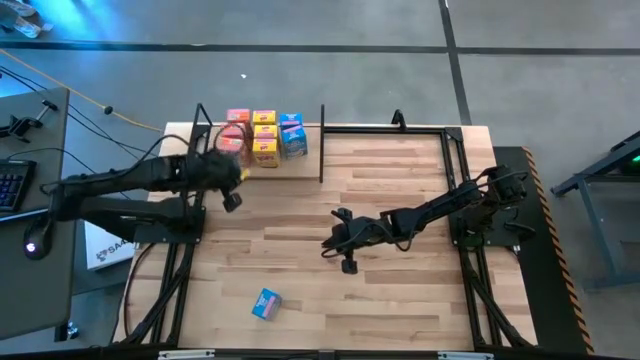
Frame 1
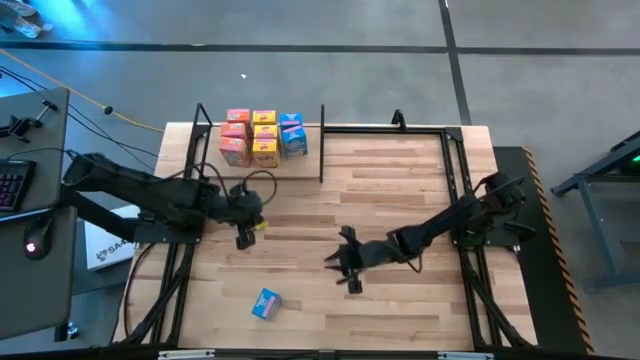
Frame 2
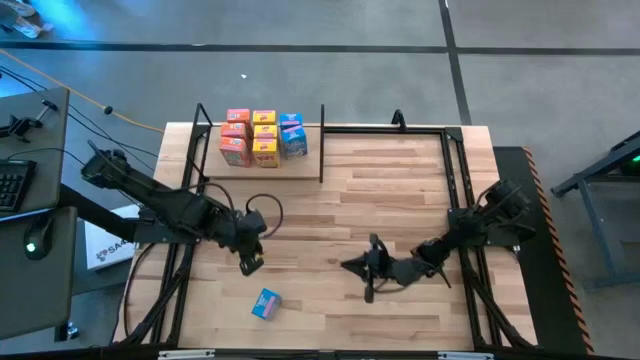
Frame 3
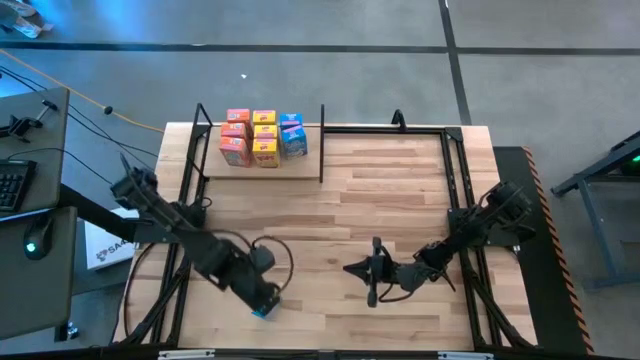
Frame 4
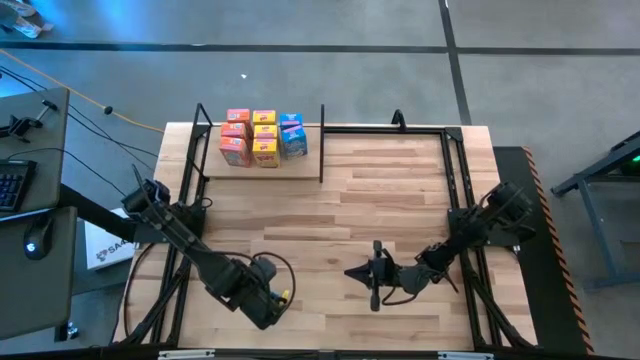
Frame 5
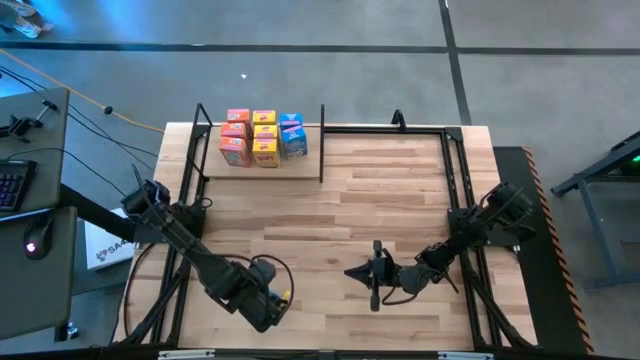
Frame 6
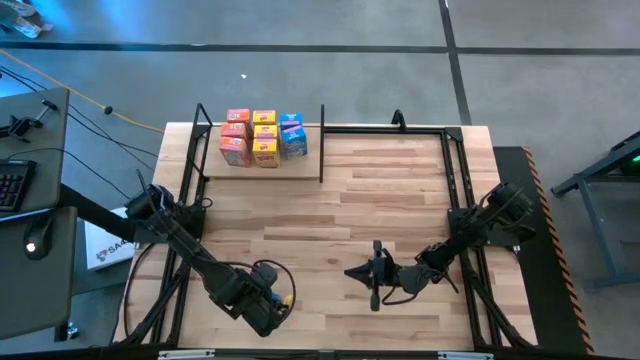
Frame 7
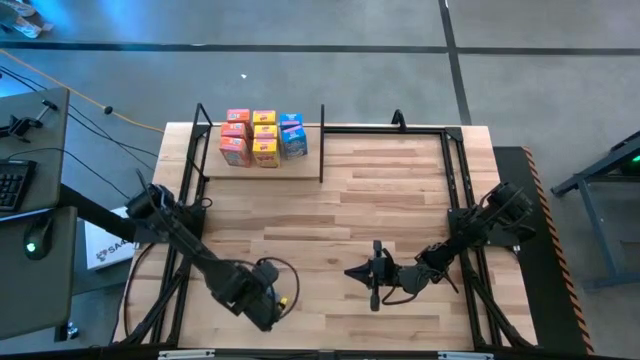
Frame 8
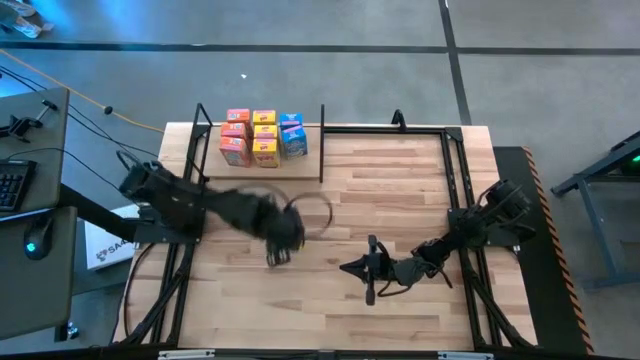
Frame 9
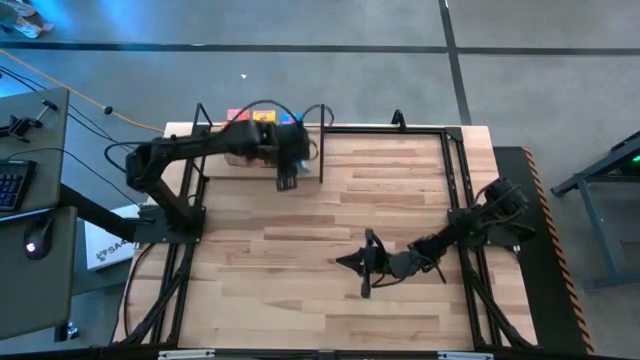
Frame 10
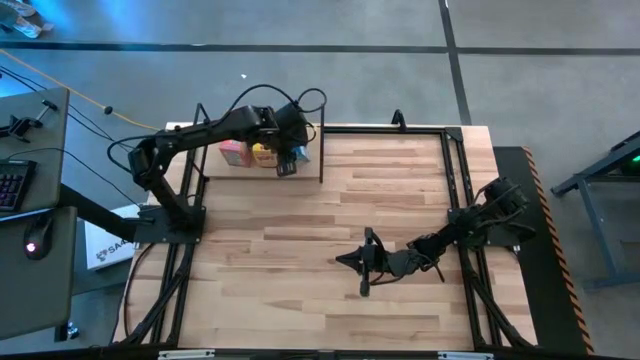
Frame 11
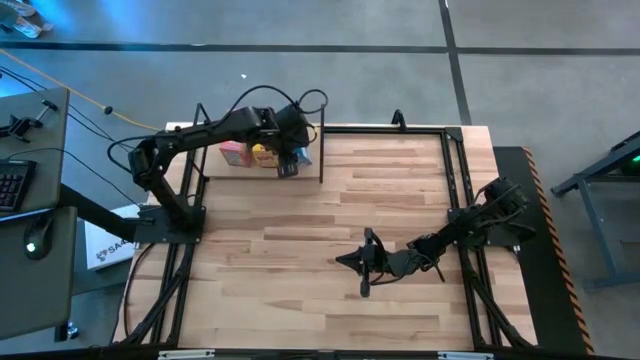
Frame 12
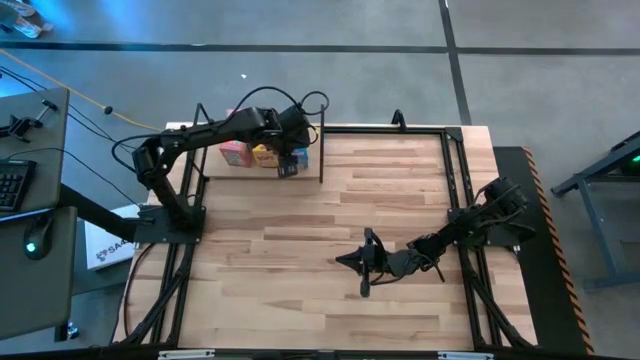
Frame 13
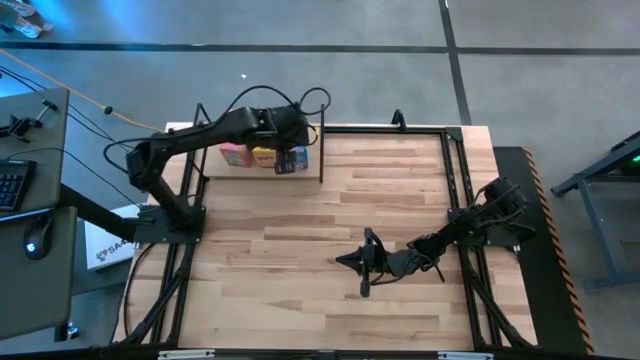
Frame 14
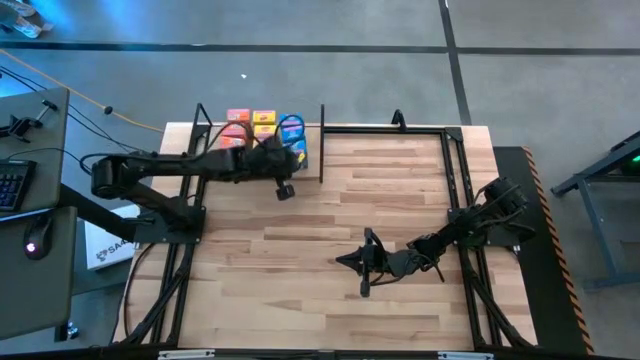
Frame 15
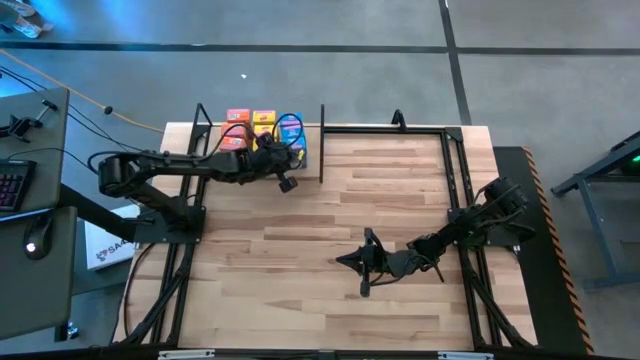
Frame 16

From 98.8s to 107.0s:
Task: Stack cereal on shelf
Put the blue cereal box on the shelf aligned with the other blue cereal box

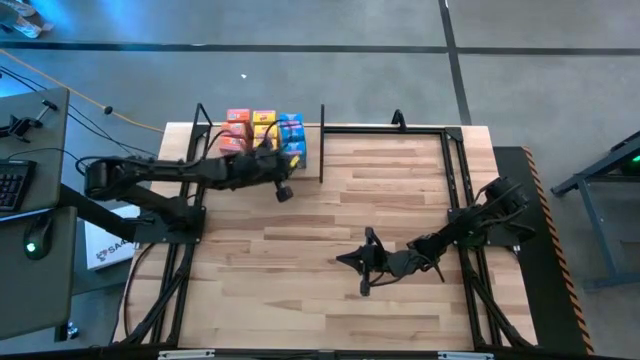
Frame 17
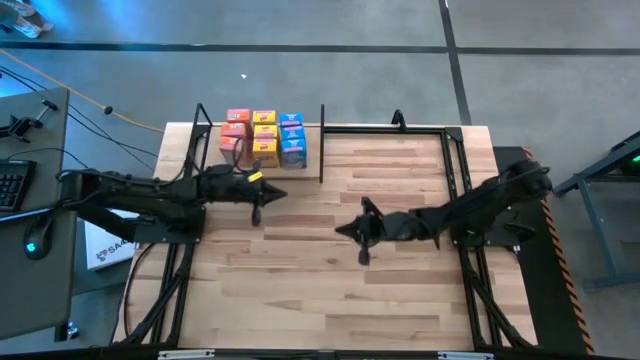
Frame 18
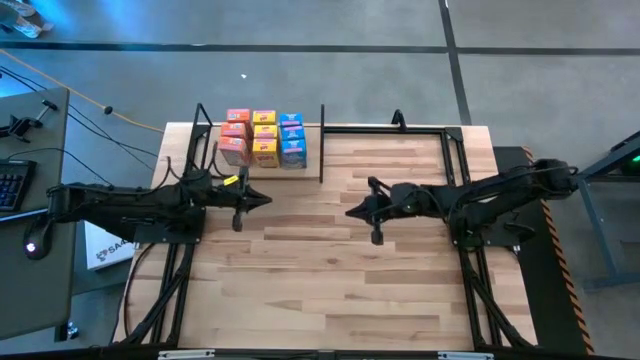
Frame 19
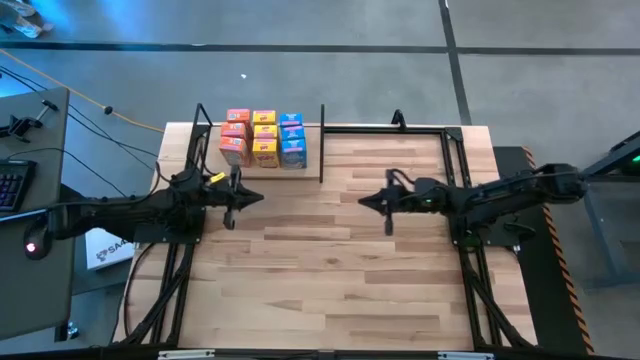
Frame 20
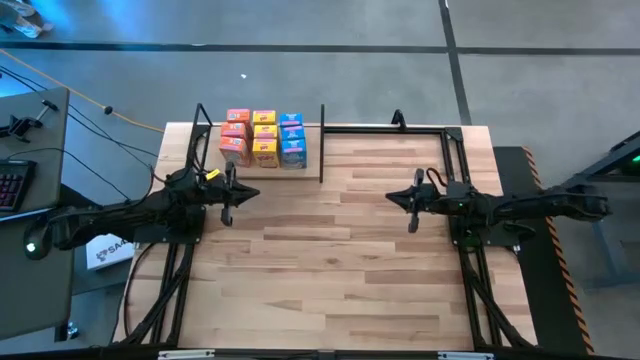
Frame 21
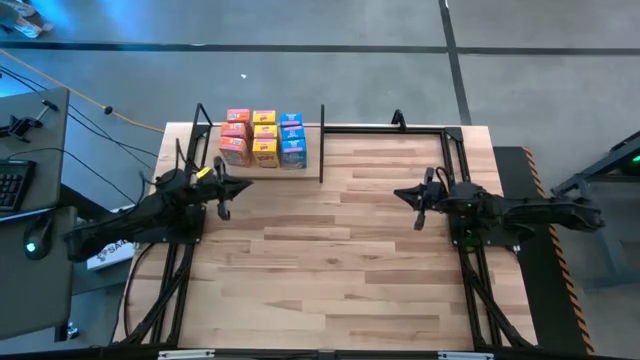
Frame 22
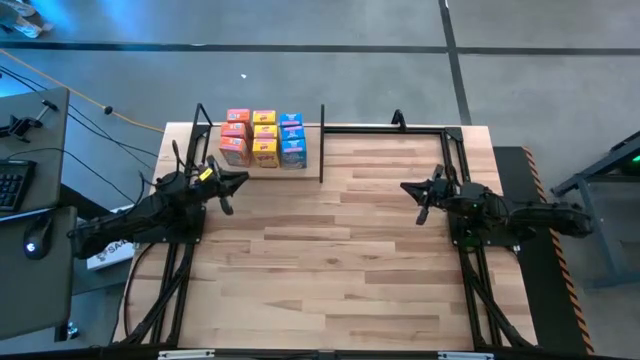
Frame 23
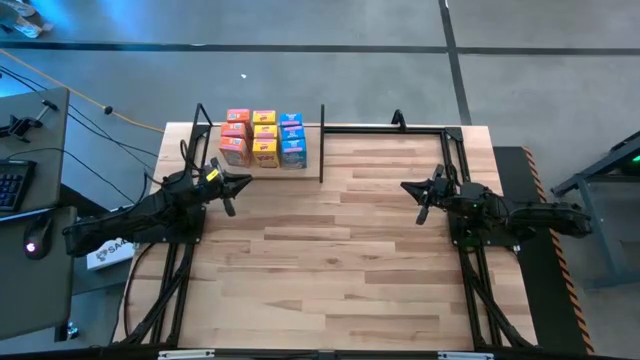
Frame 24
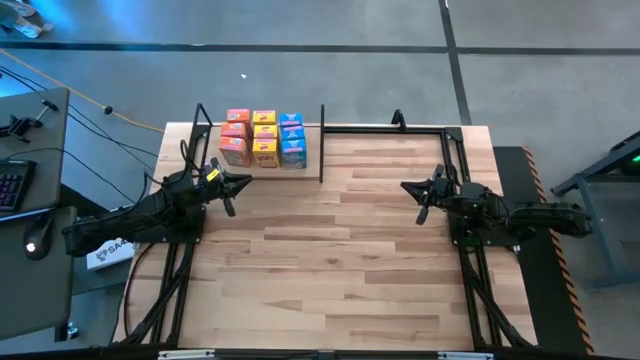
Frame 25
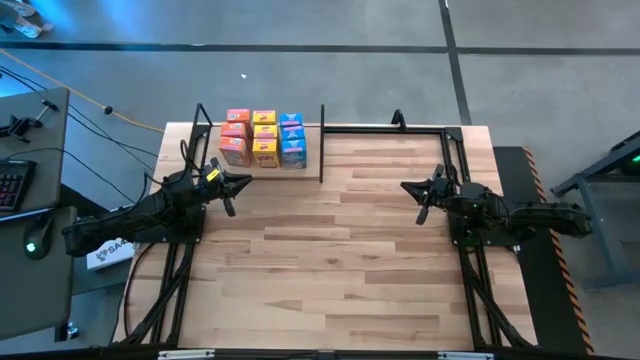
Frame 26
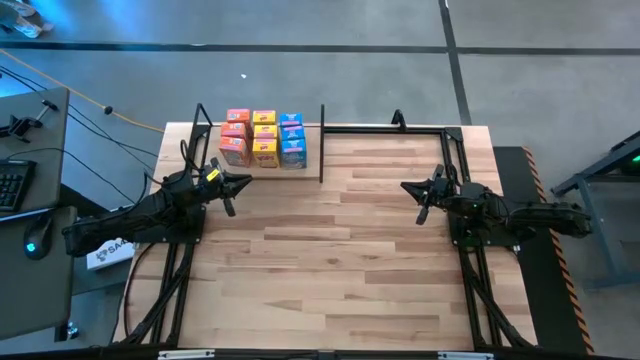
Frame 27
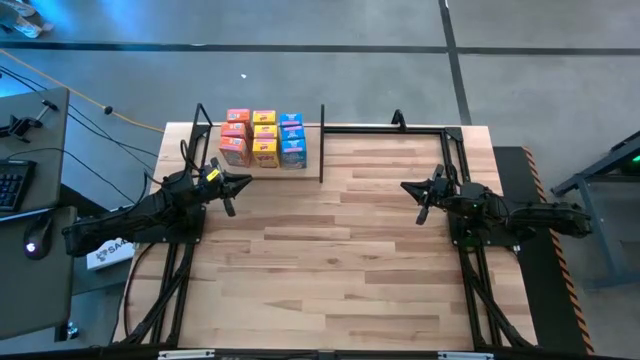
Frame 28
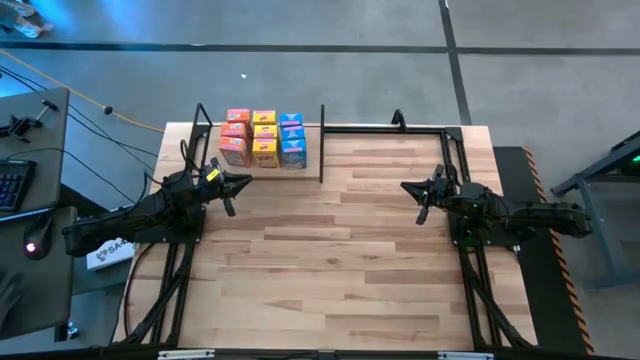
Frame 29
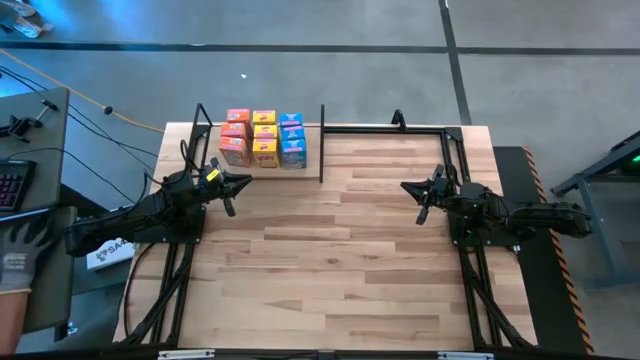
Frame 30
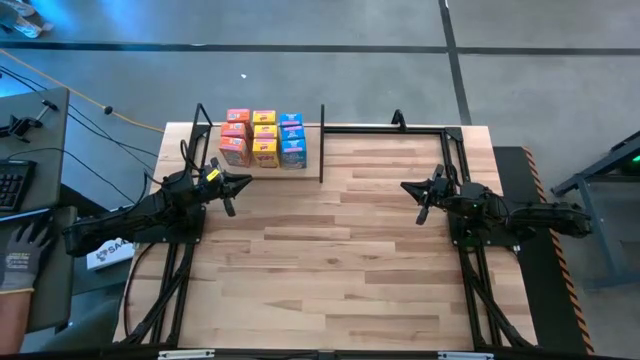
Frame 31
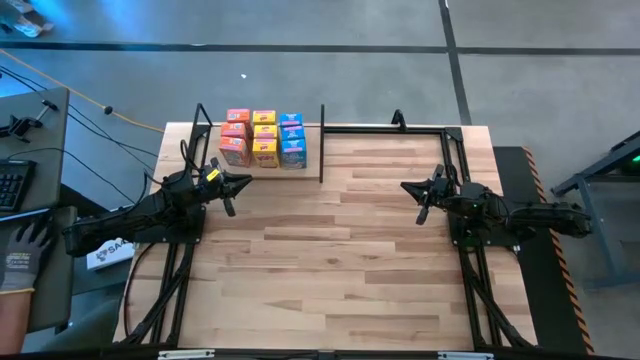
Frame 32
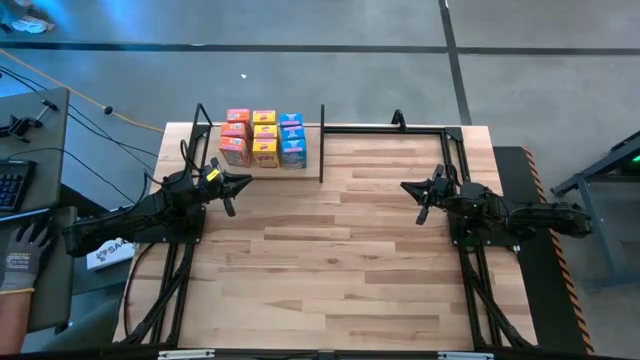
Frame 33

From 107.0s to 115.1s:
Return to Home Position

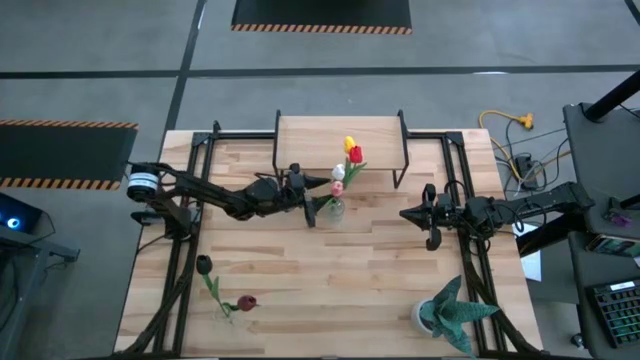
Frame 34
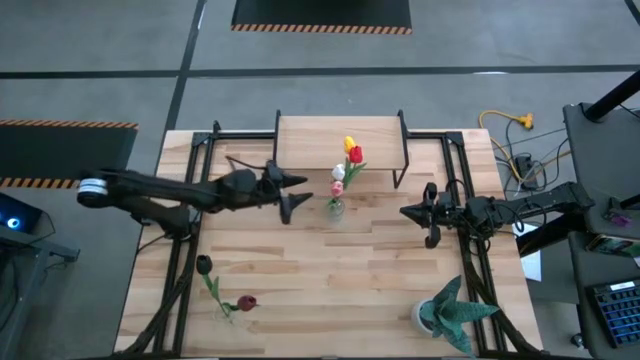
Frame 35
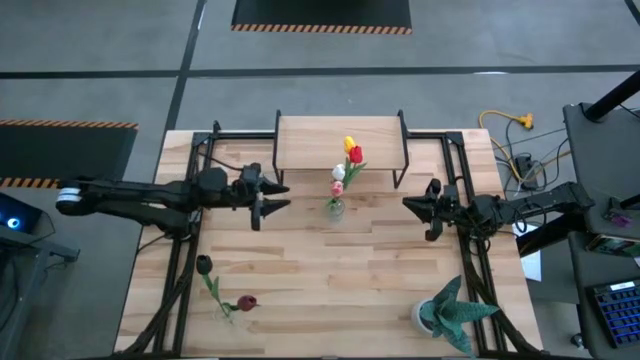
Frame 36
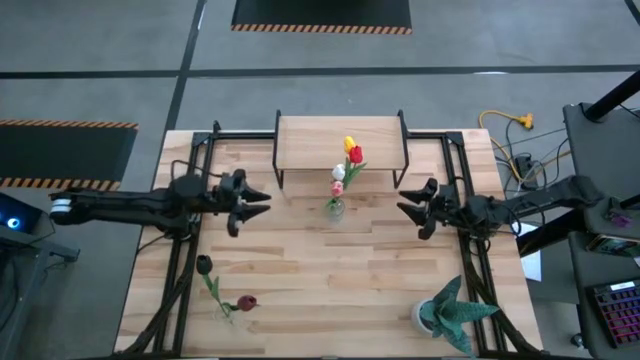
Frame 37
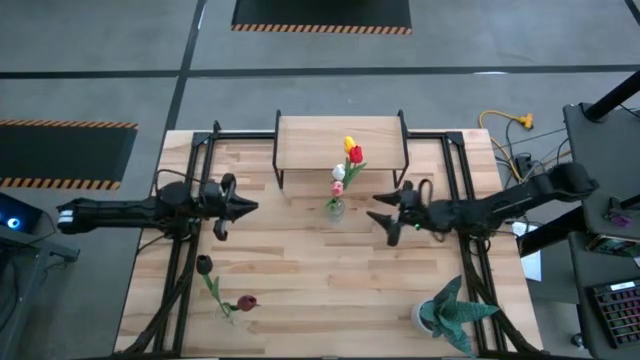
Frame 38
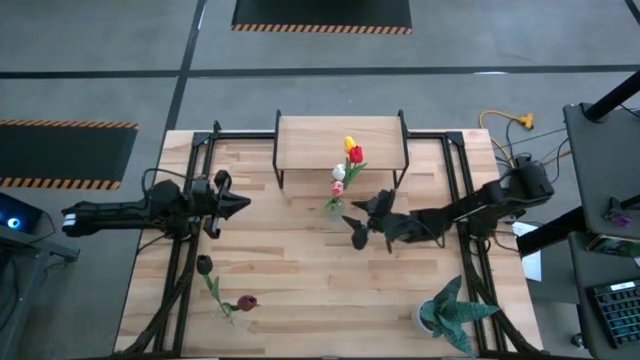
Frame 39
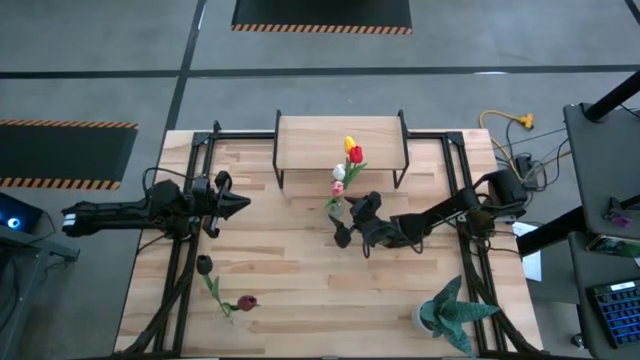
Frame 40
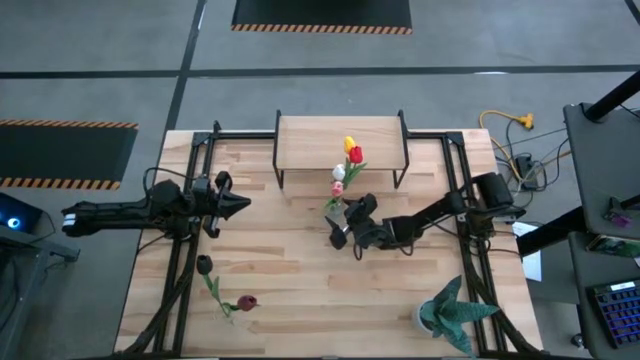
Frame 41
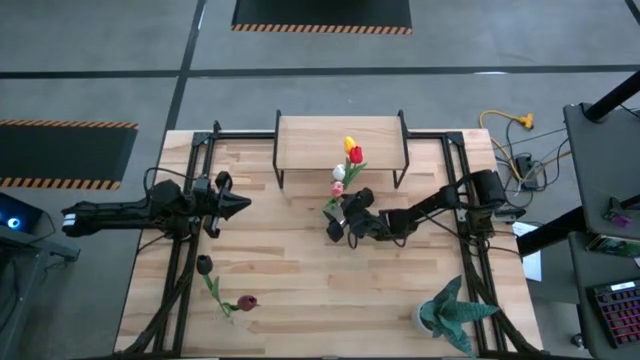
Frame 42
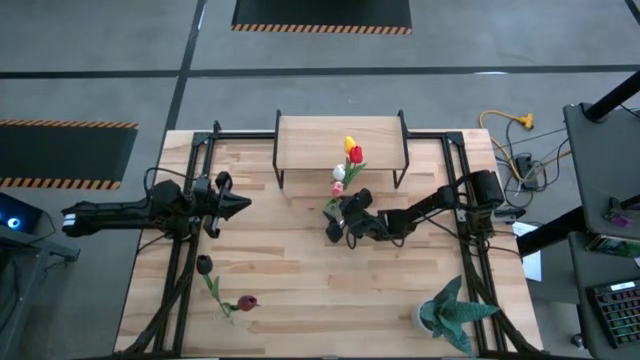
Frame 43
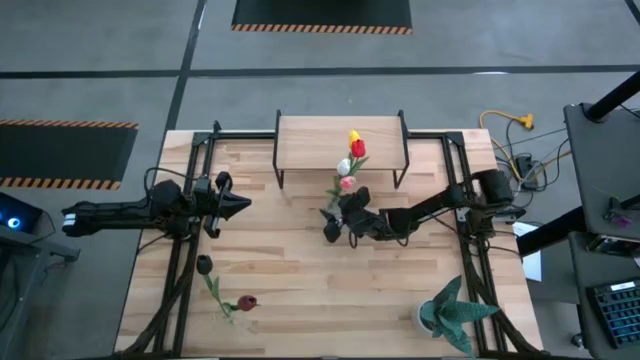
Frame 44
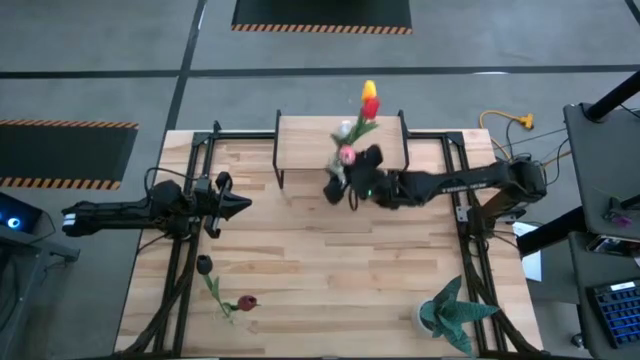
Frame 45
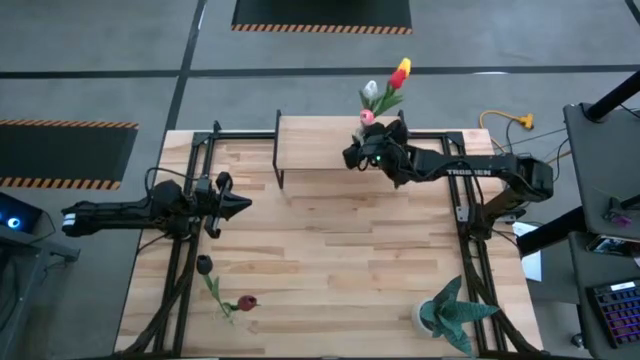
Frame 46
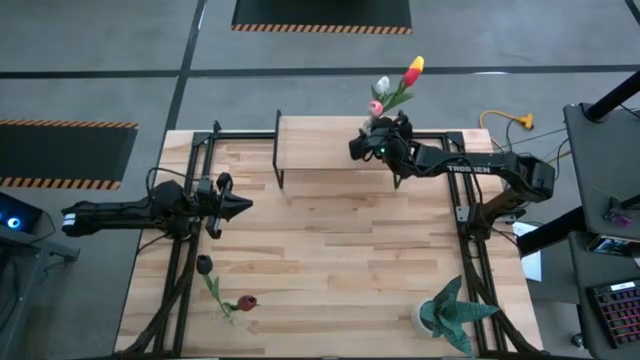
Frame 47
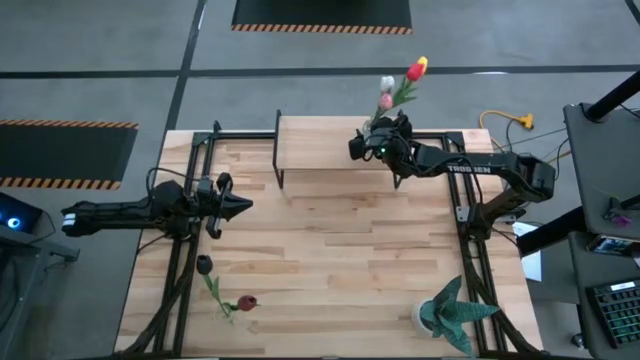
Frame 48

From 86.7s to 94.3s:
Task: Pick and place flowers into a vace then onto a shelf
Put the top transparent vase with the tulips on the shelf
